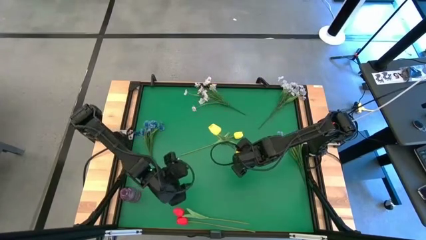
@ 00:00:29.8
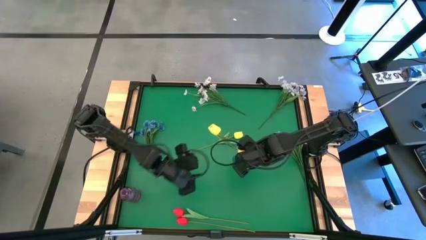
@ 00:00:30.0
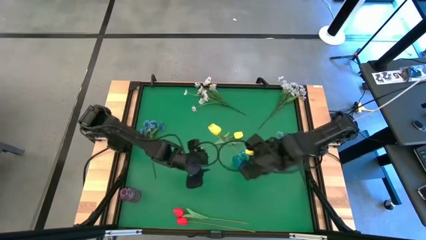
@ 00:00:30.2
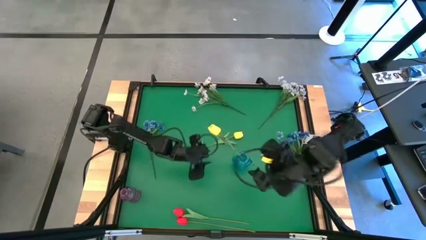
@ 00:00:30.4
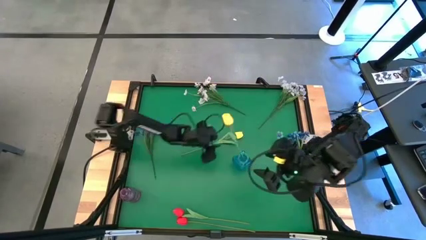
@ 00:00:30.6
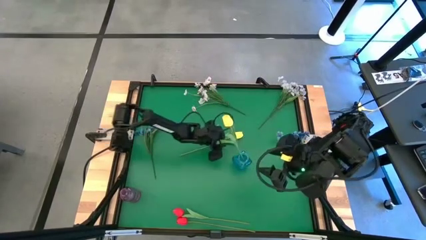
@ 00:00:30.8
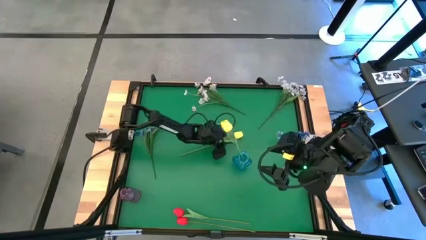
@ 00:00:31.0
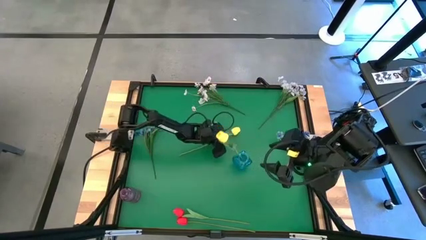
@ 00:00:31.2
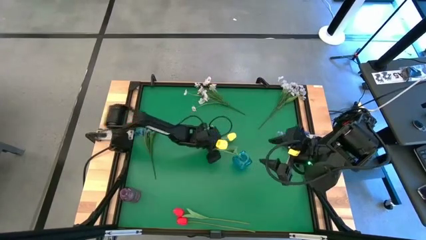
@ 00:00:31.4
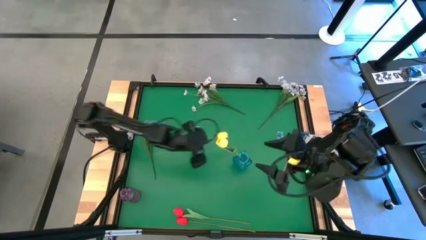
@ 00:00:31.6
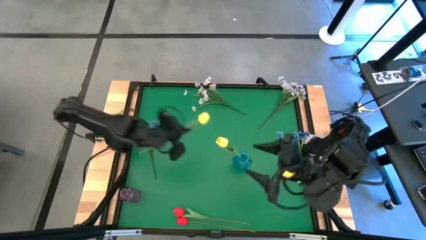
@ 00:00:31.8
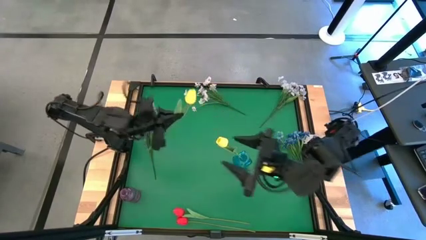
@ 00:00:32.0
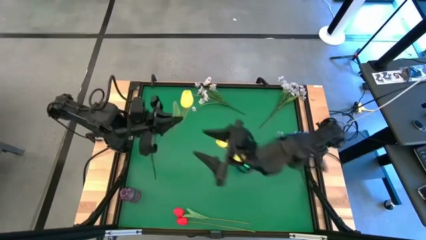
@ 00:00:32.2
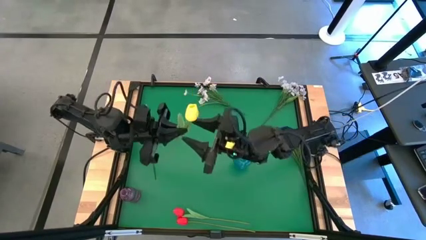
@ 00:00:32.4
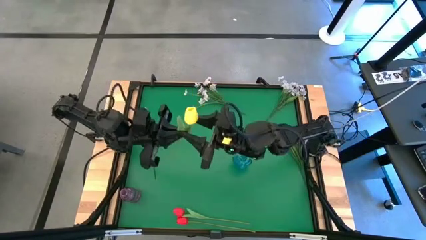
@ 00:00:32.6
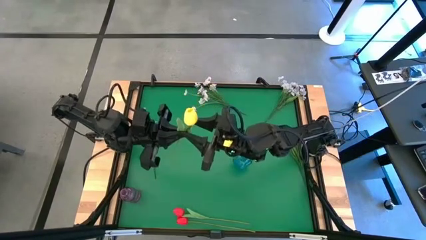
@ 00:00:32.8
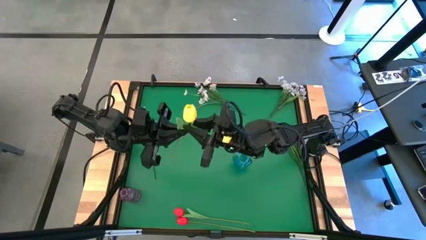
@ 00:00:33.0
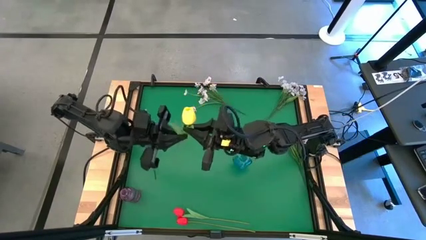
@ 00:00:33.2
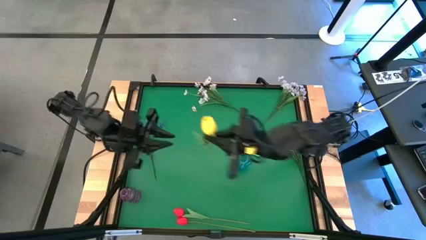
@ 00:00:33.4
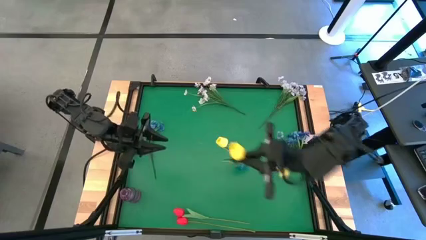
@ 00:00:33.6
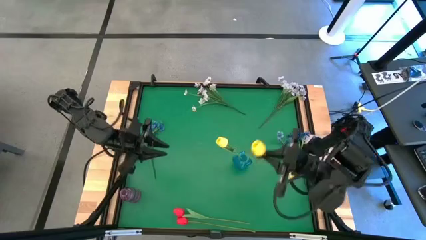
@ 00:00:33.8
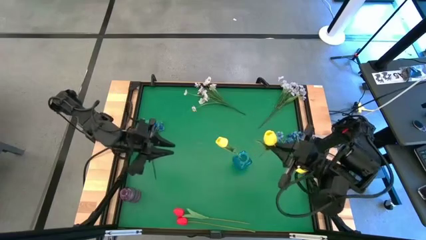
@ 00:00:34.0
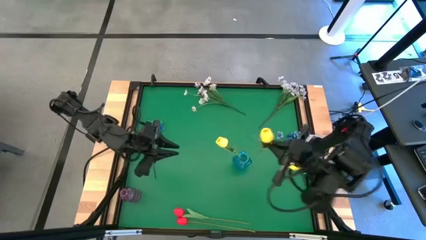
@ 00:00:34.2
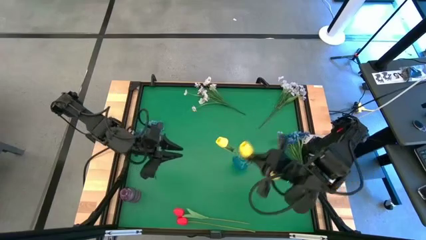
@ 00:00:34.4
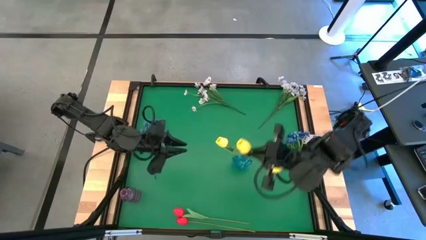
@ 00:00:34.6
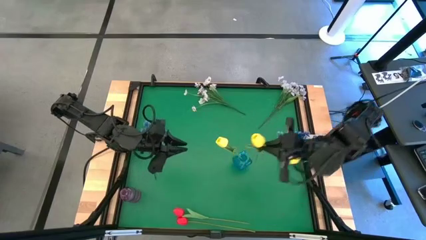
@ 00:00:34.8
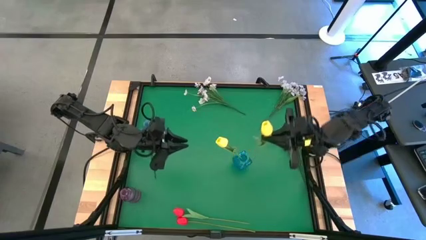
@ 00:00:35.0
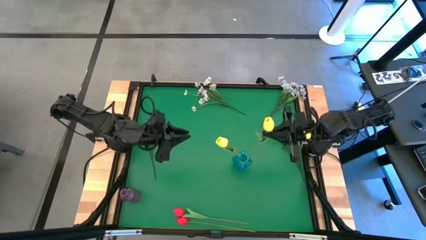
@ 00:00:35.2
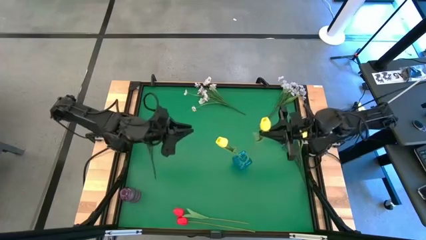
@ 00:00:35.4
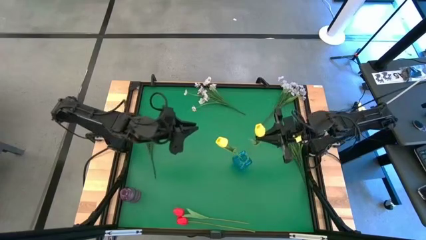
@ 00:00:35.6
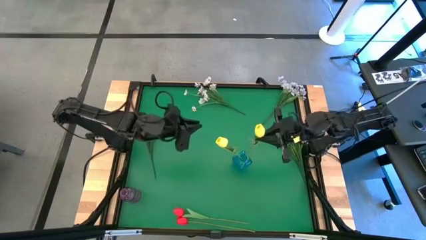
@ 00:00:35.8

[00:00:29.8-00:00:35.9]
Task: Sort flowers into vase by color
Put the yellow tulip into the blue vase

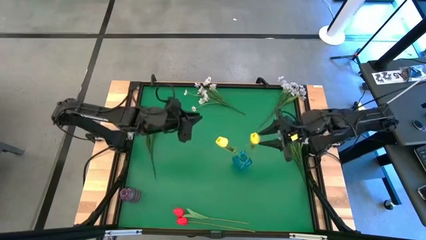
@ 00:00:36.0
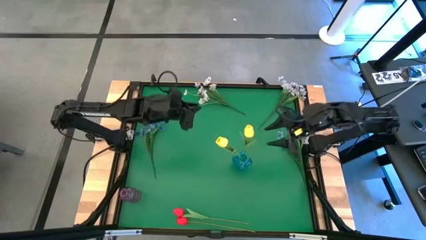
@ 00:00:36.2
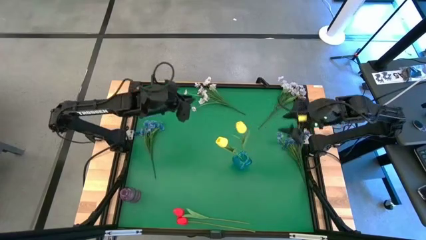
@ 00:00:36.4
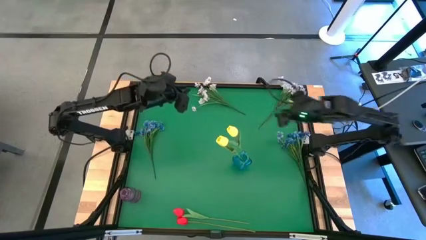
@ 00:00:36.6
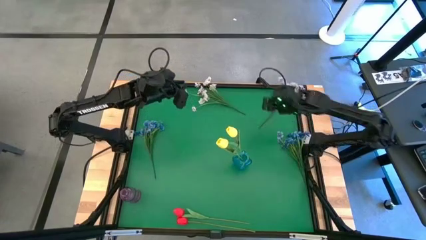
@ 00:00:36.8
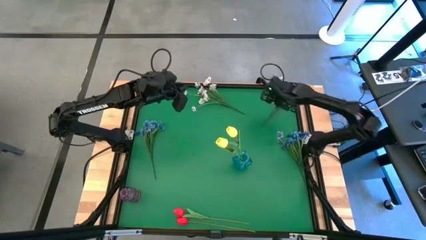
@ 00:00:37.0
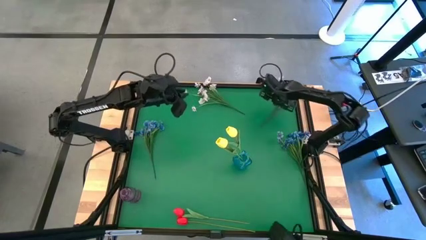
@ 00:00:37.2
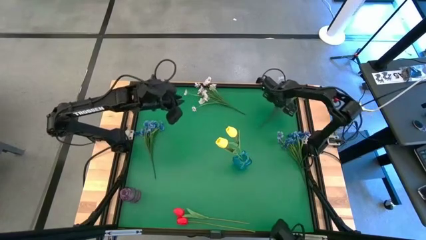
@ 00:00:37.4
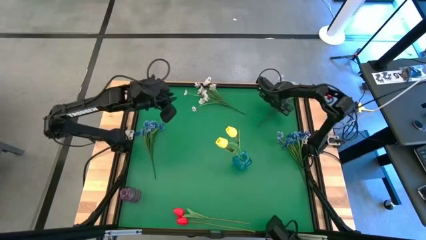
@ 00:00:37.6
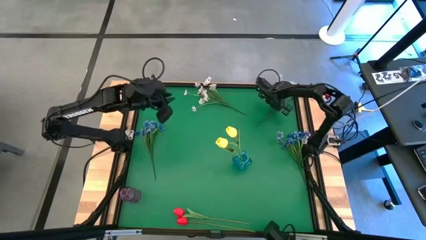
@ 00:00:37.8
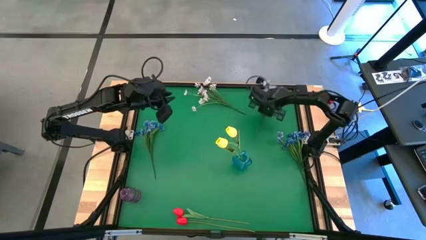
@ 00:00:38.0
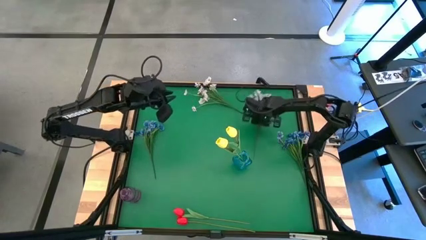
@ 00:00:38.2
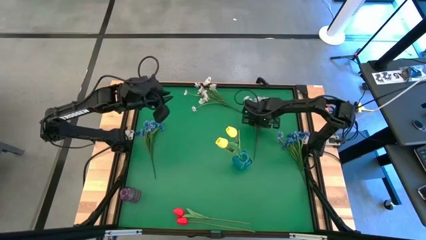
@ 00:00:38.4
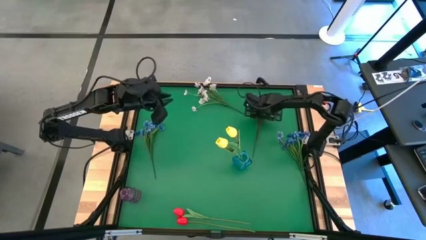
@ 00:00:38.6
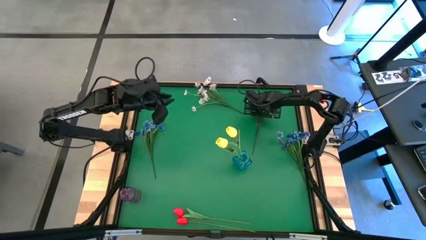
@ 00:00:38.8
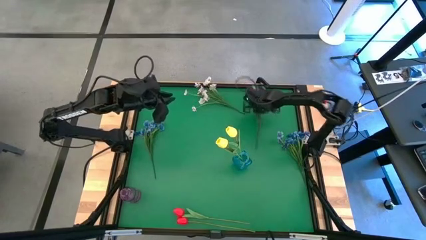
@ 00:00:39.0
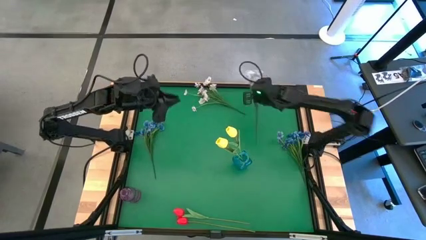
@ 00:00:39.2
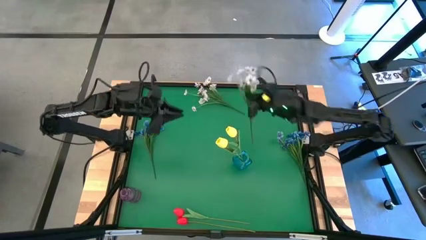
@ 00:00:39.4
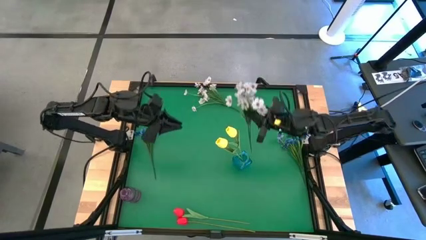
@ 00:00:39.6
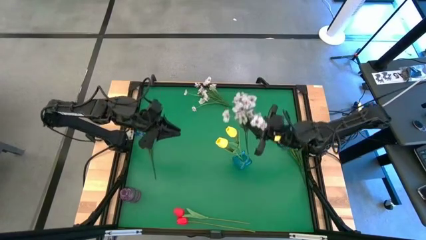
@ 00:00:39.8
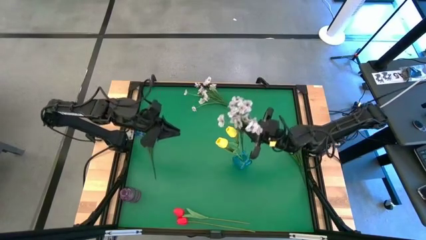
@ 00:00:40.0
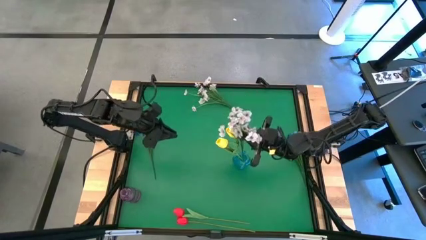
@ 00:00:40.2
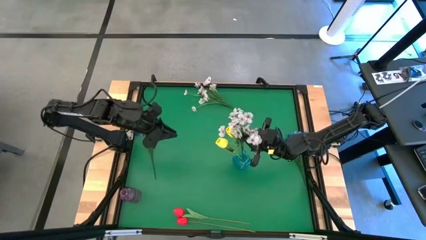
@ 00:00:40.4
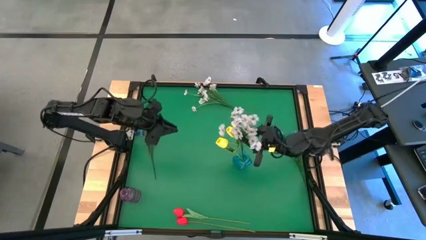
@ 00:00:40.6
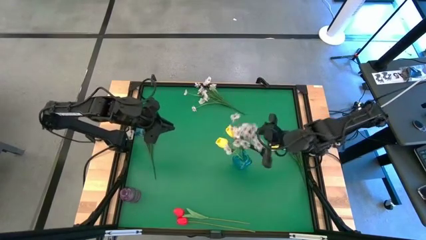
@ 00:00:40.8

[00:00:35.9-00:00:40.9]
Put the right white flowers into the blue vase
